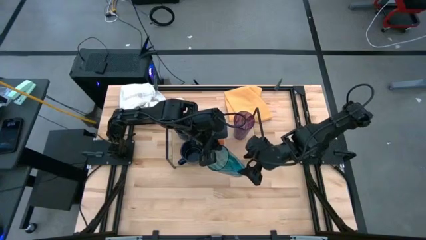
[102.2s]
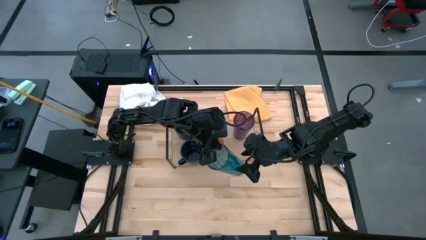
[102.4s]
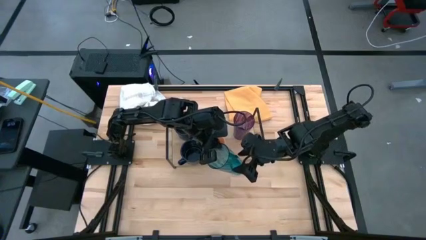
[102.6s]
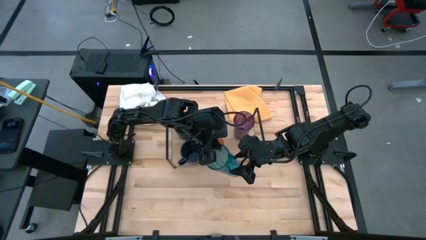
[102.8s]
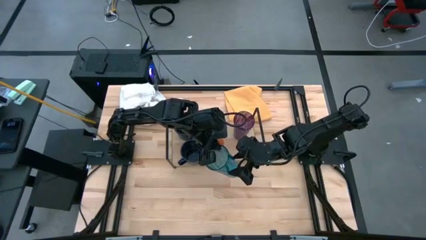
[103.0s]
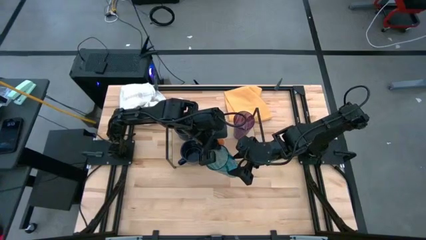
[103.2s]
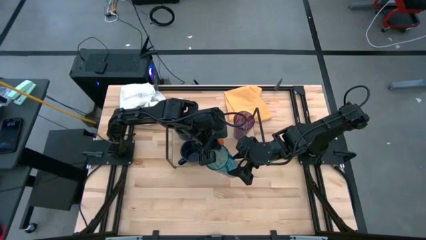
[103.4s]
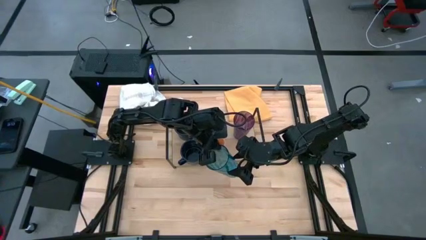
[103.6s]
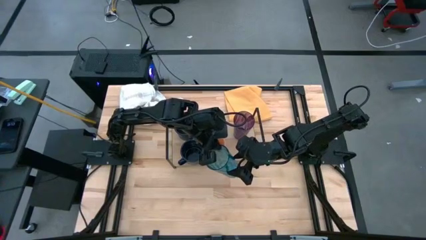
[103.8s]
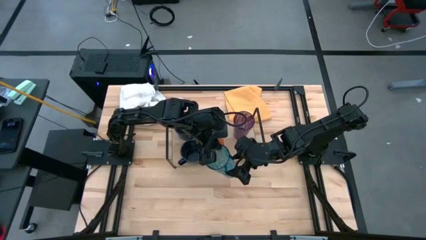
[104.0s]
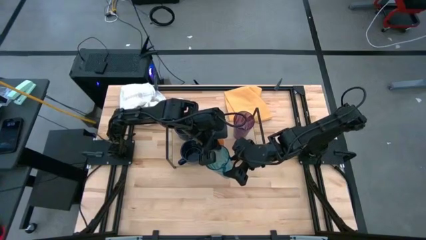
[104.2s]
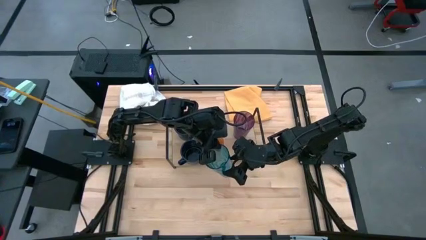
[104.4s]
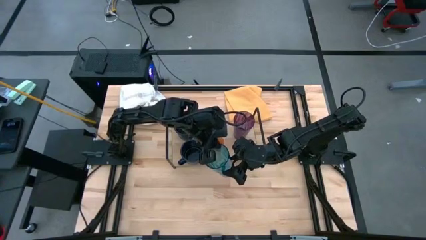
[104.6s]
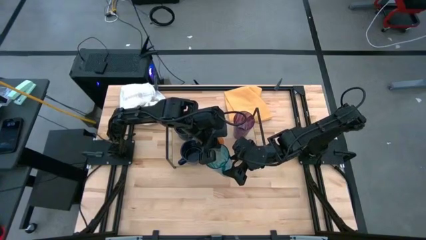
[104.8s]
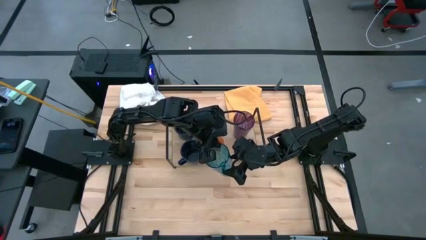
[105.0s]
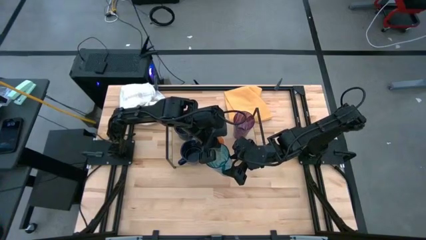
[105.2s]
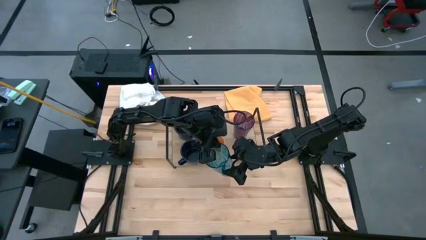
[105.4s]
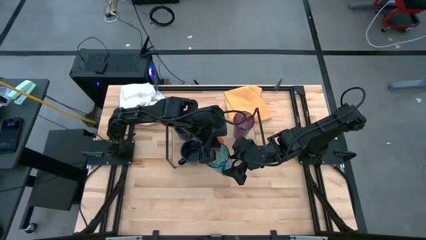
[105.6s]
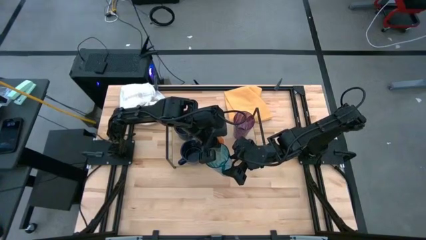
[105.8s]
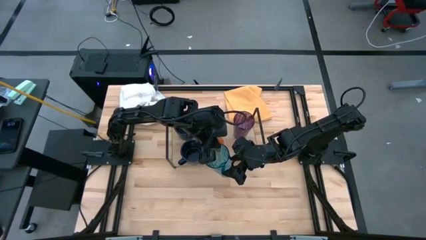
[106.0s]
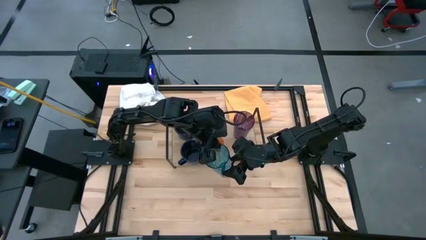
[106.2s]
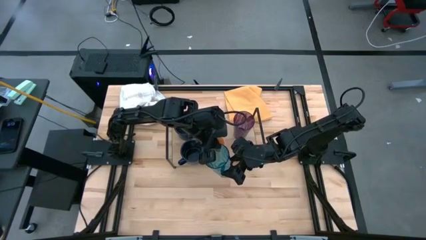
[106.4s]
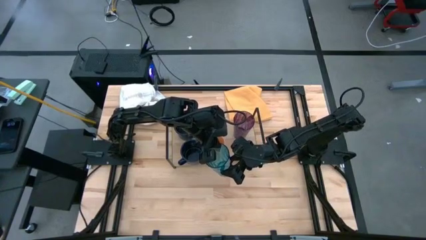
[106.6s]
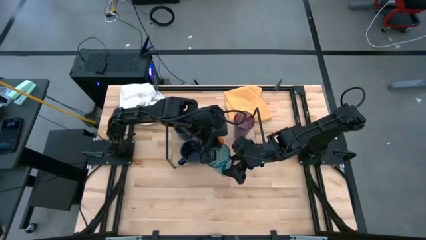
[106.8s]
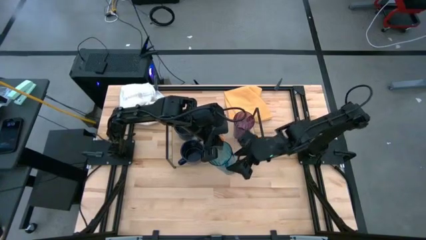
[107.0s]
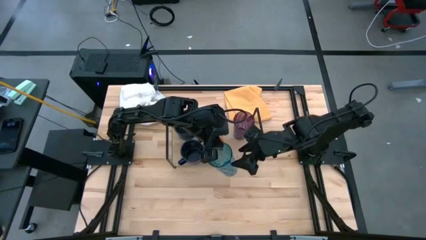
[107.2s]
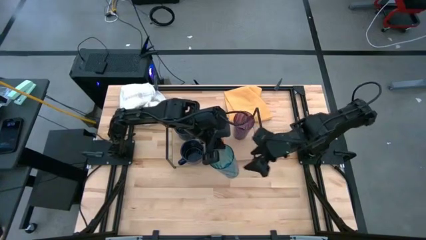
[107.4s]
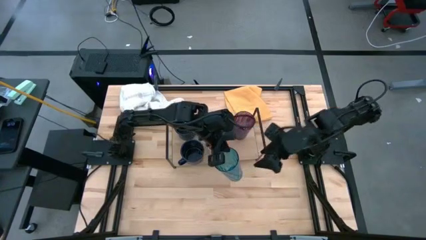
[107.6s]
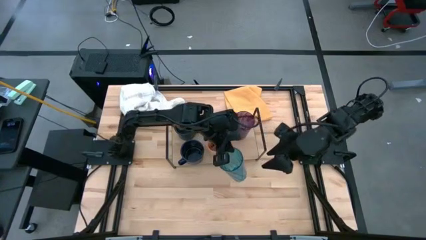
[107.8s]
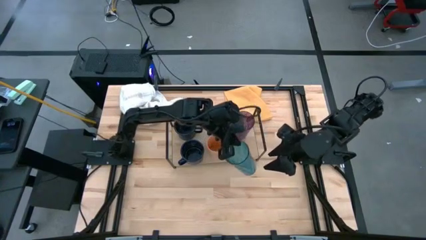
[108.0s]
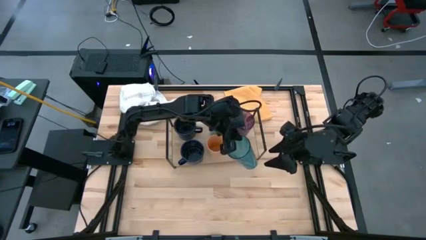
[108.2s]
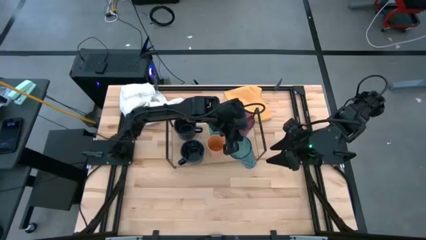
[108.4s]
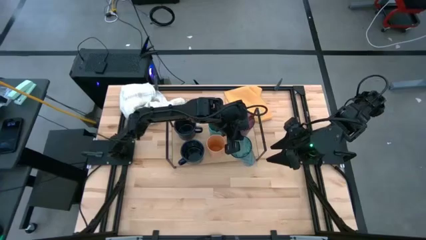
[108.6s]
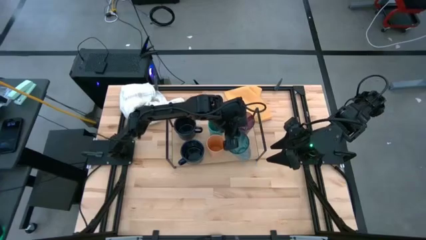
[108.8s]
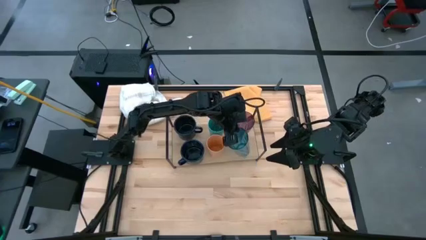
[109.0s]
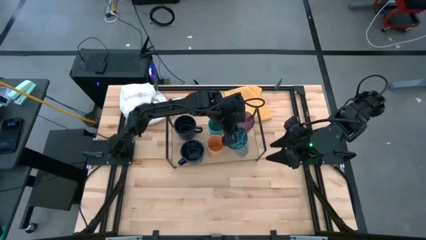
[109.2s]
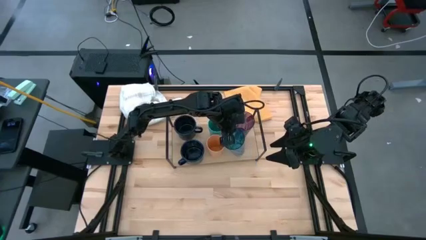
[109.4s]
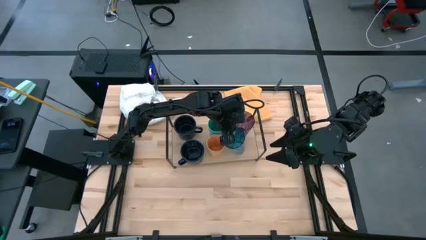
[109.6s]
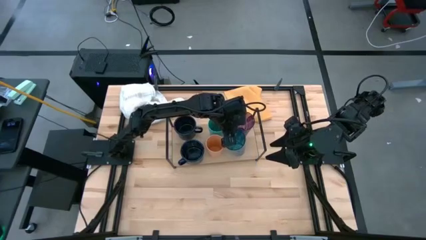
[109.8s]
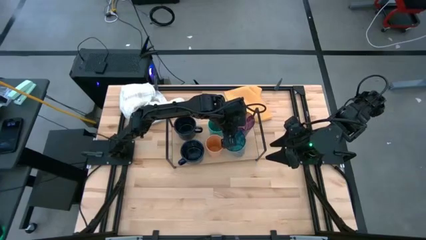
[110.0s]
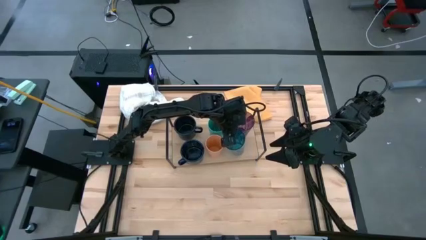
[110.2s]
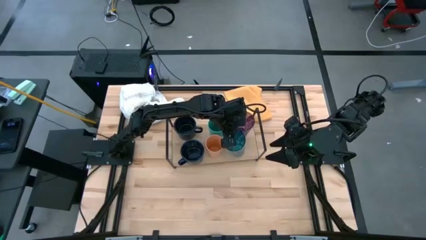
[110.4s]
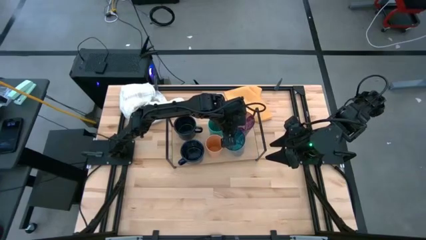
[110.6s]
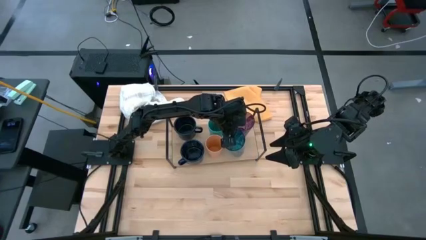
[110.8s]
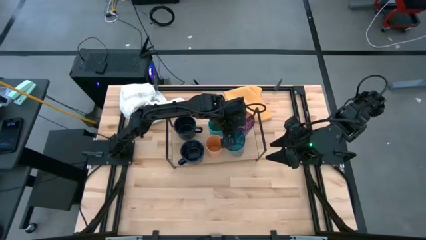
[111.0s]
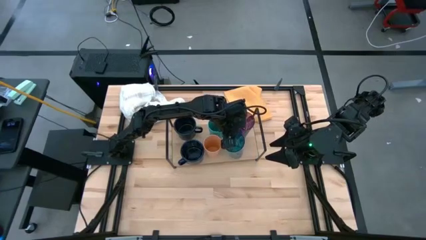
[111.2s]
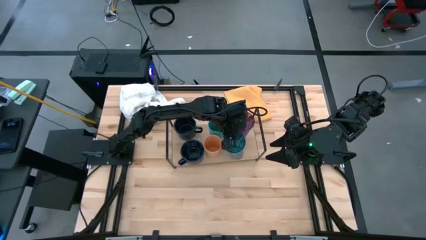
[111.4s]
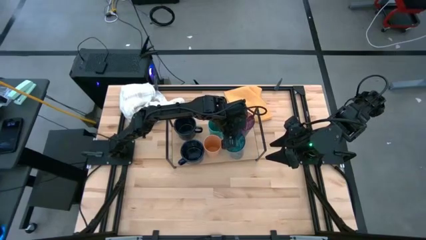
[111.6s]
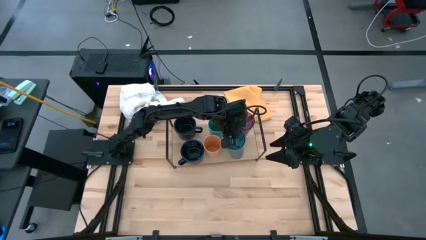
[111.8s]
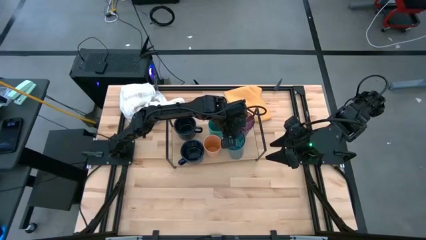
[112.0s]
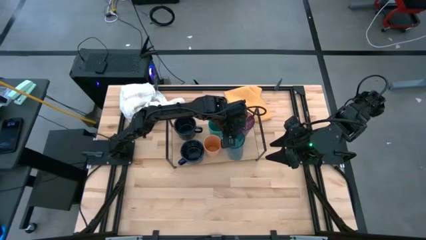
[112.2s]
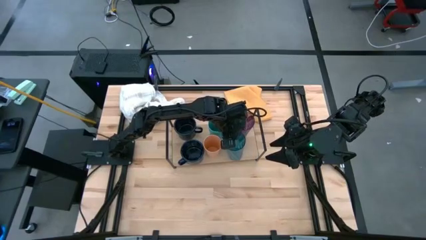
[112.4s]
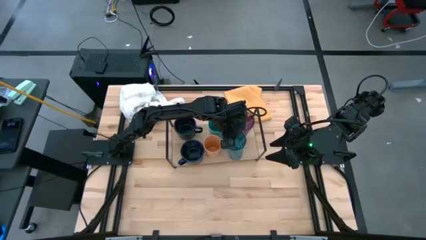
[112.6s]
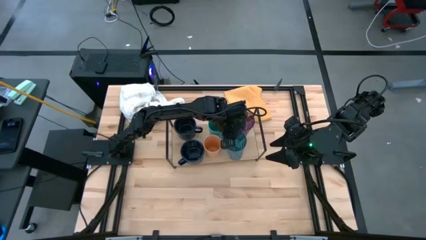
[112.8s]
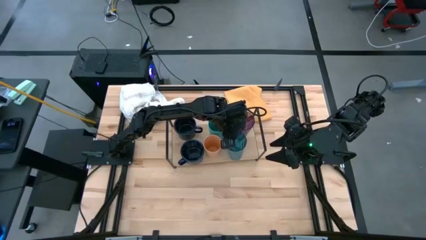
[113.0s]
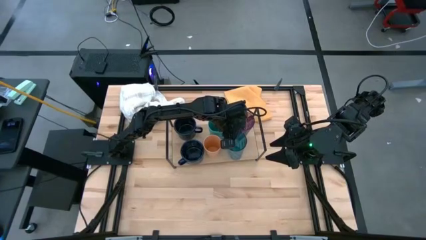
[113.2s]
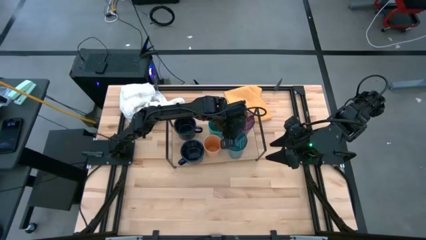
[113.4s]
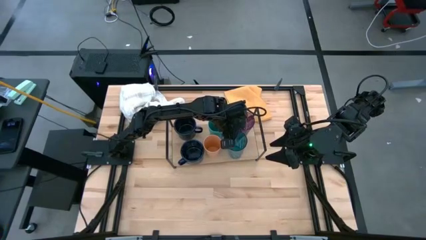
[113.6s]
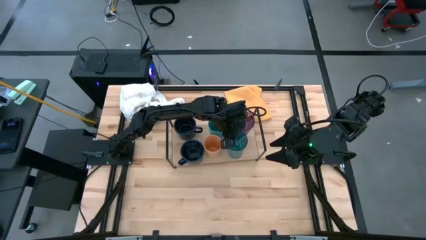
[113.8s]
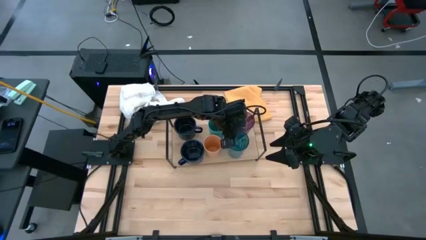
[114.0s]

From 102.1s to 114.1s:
Task: Stack small to large cups/mugs on shelf
Put the blue cup on the shelf

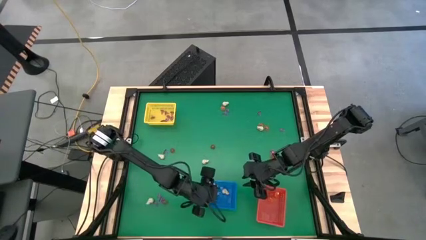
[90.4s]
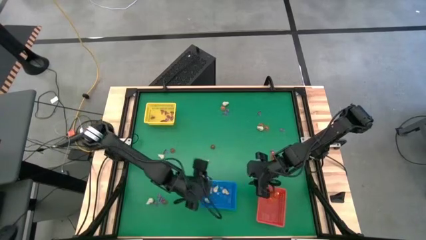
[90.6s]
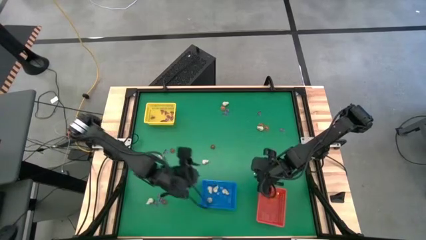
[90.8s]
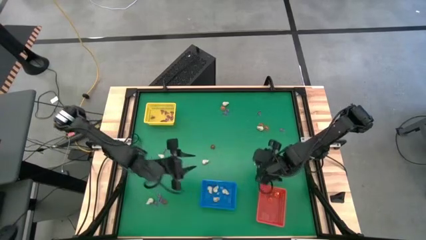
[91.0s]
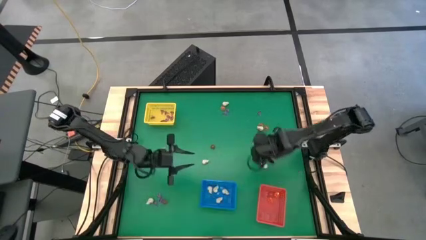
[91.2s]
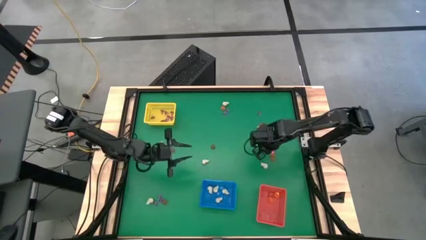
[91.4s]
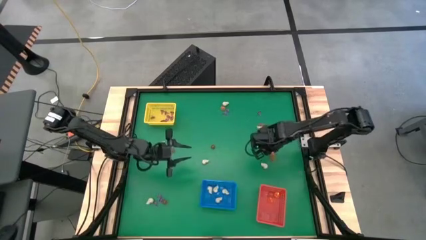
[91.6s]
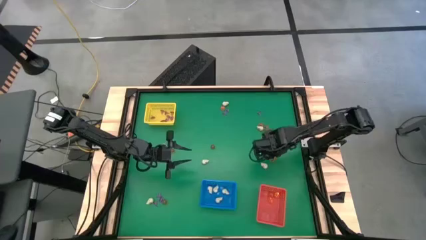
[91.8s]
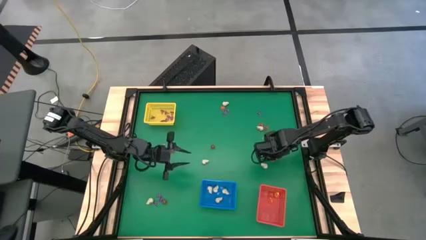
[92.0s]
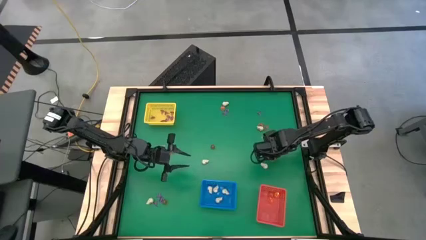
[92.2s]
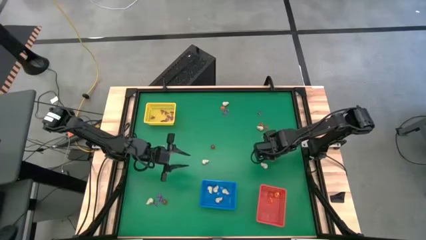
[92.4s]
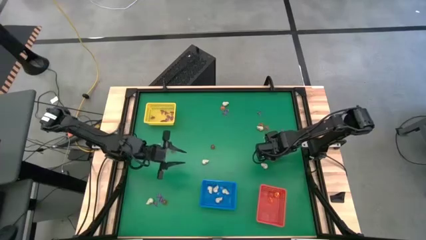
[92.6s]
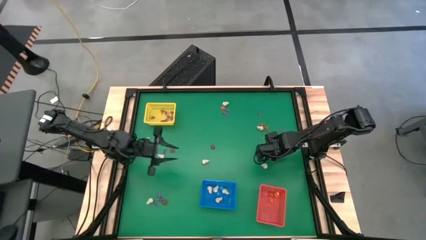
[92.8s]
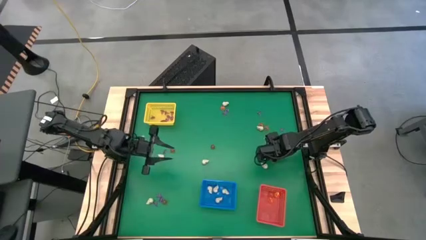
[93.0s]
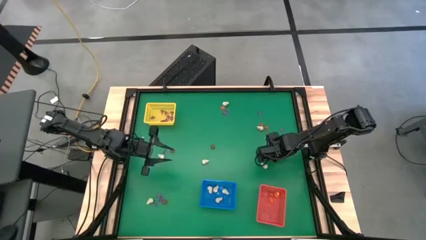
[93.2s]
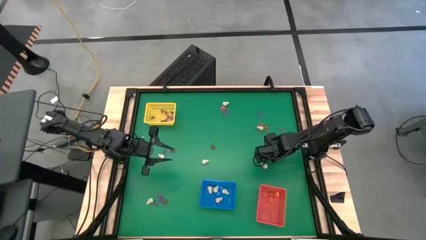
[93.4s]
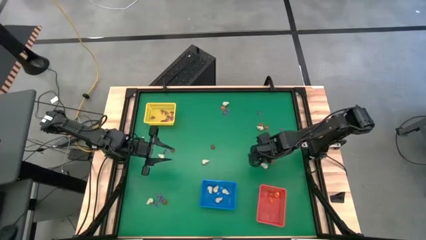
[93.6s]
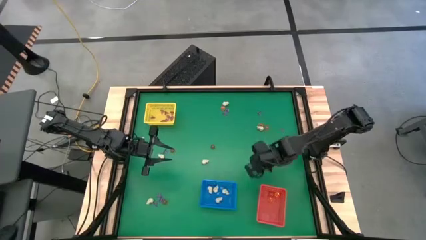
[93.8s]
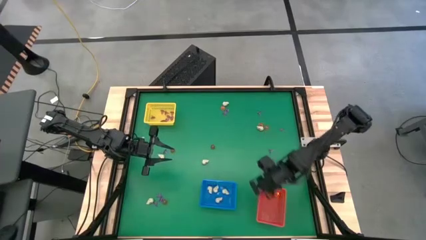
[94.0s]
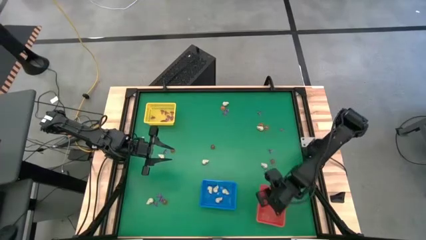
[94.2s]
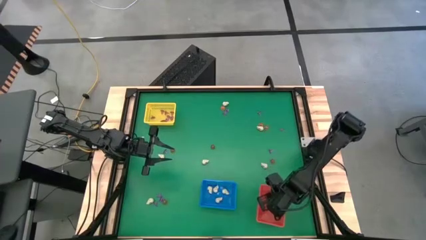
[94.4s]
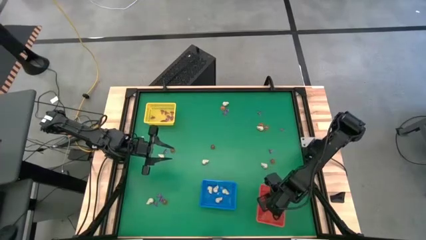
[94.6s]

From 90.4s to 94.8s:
Task: Sort Halloween decoration
Put the orange pumpkin toy into the orange basket
